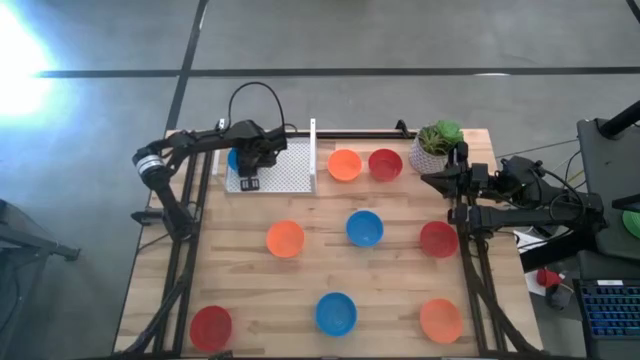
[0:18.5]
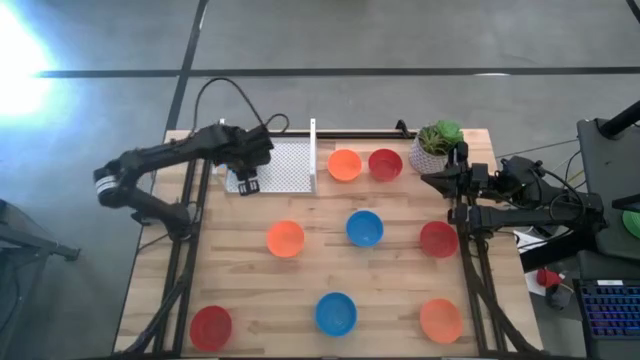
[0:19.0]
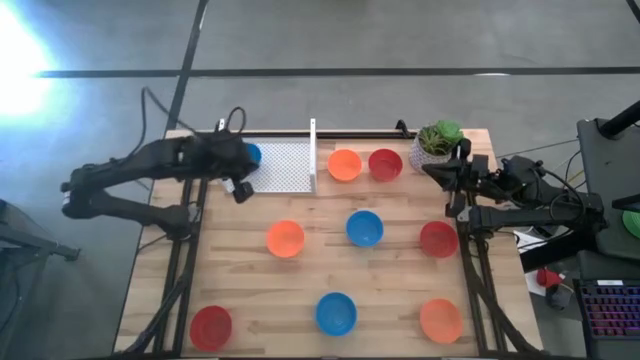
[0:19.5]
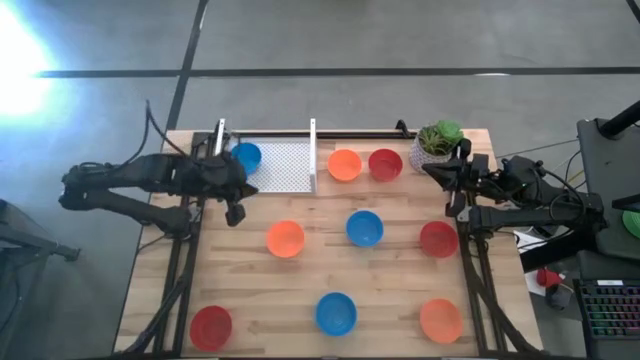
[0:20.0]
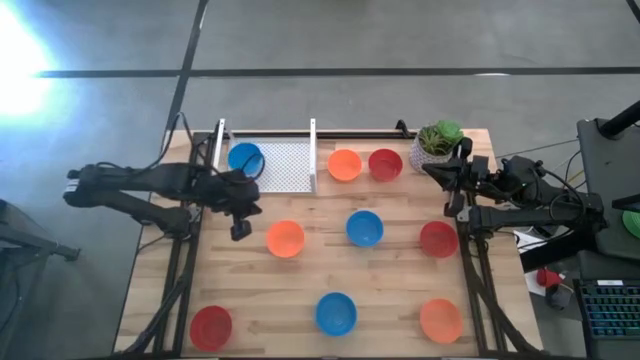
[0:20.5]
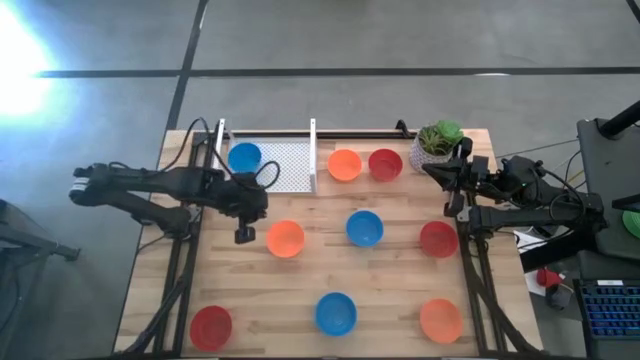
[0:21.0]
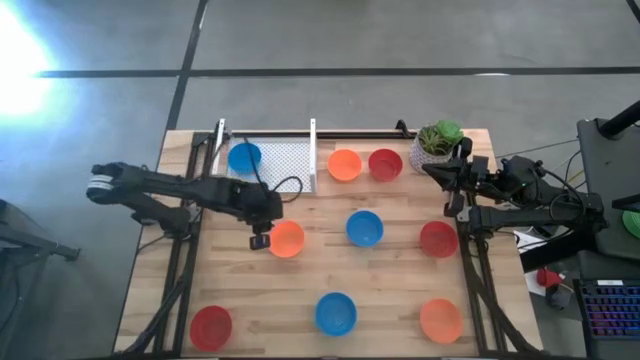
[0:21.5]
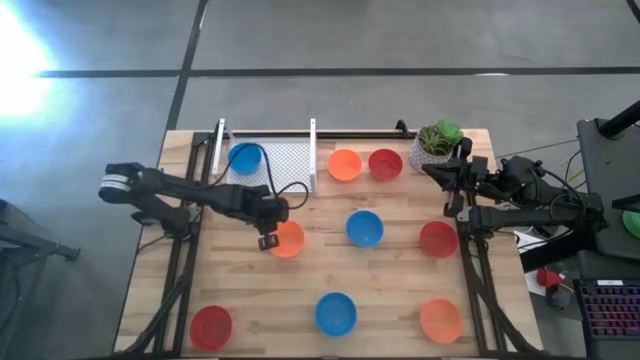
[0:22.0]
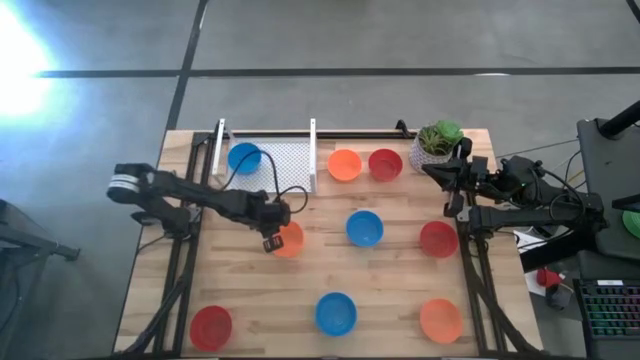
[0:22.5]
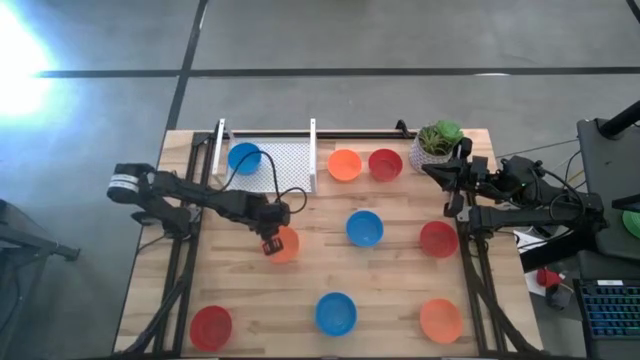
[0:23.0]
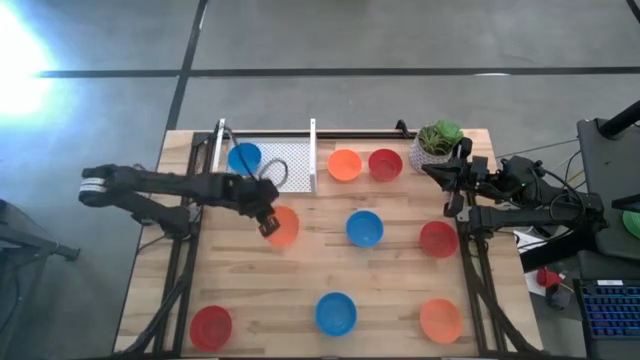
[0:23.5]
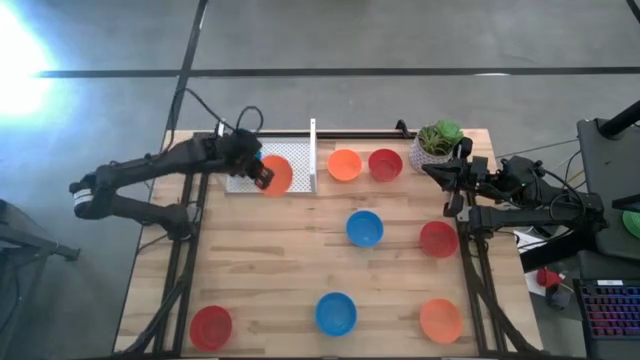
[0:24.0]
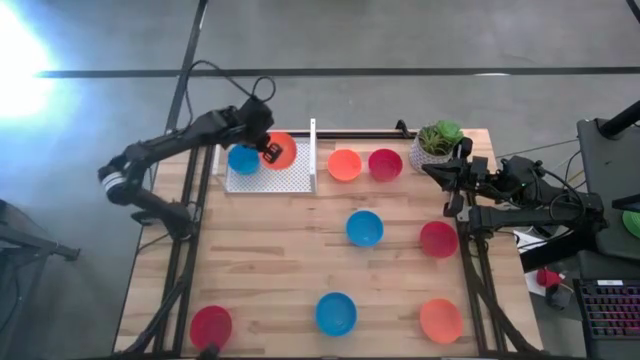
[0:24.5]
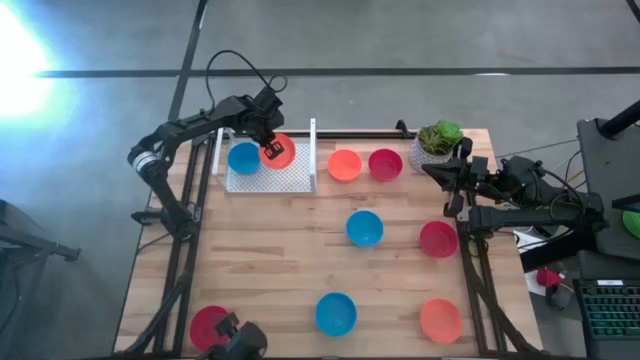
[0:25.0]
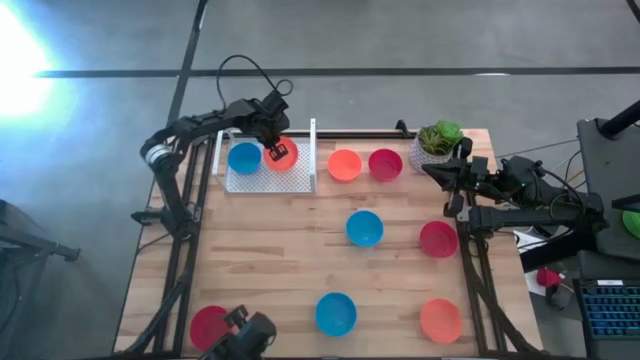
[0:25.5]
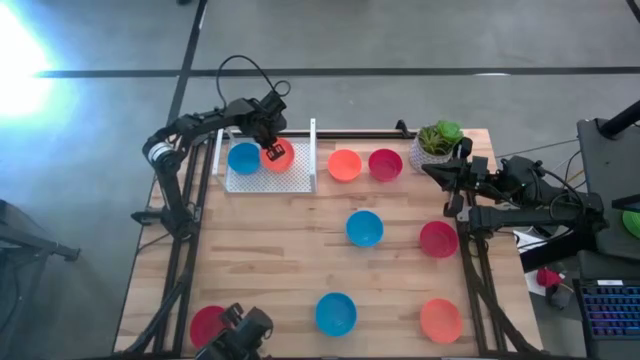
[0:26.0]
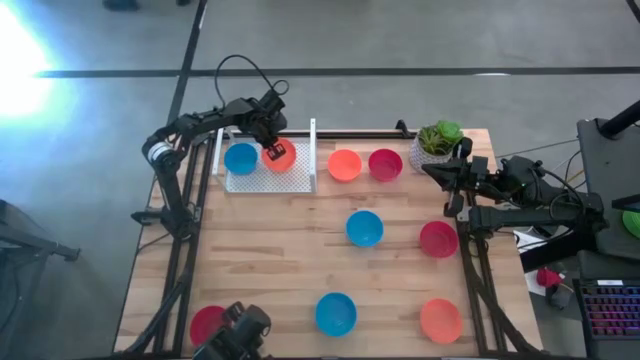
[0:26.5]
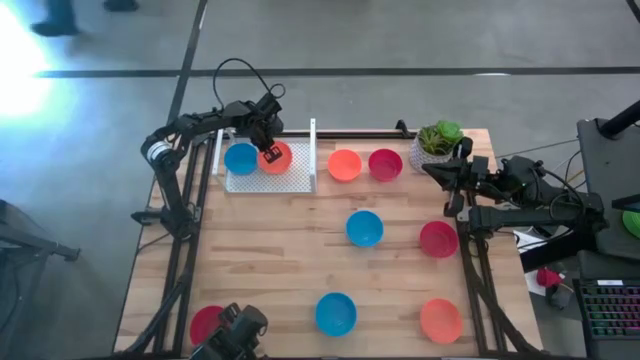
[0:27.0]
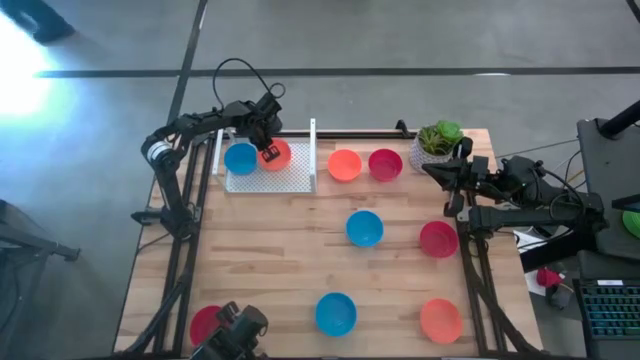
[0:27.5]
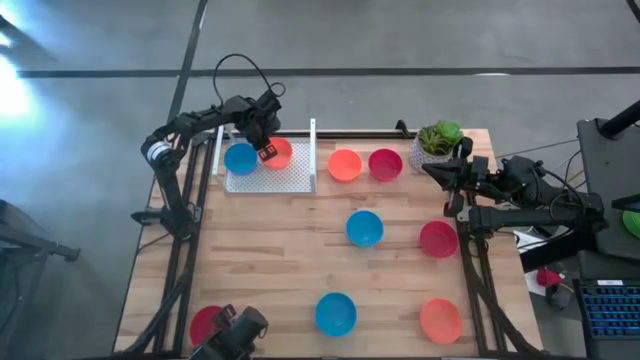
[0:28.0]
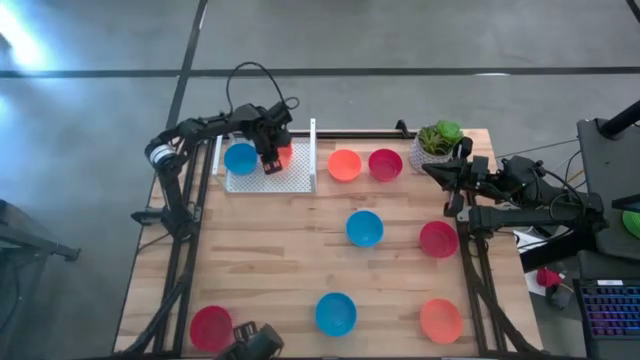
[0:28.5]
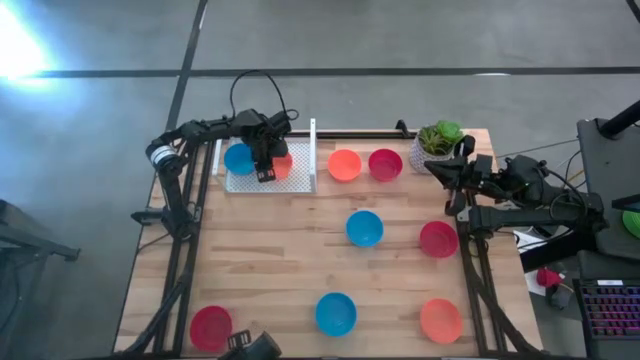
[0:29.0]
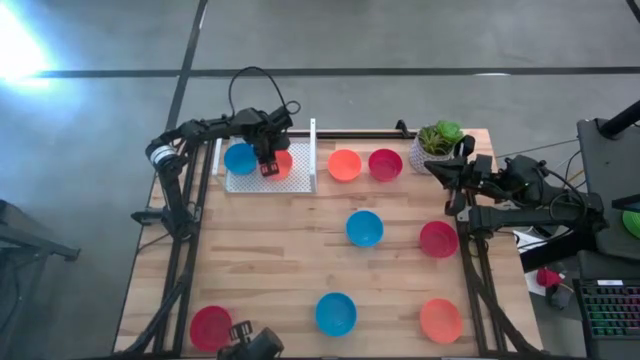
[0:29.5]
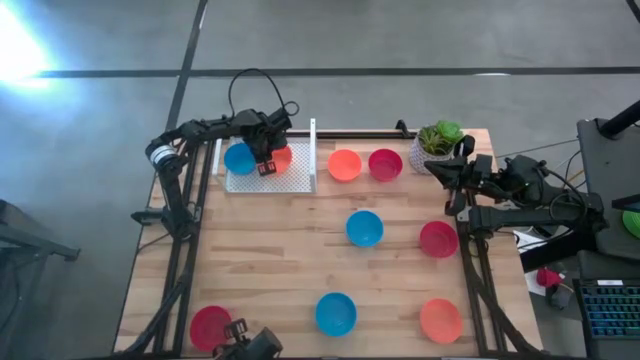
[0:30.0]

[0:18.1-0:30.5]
Task: Pick & Place Mini bowls
Put the left orange bowl on the shelf

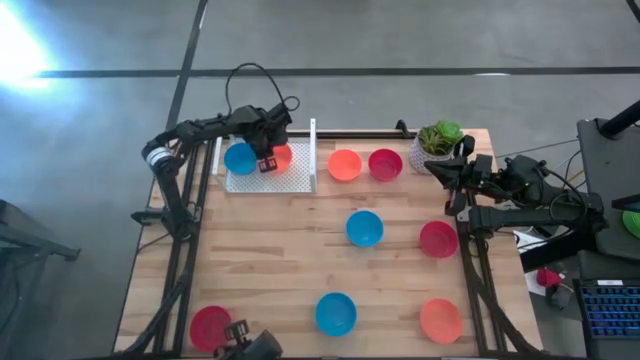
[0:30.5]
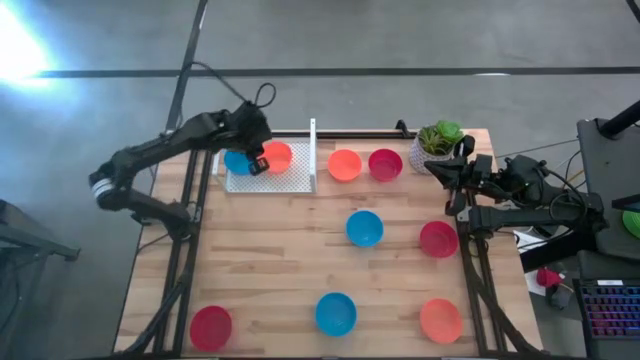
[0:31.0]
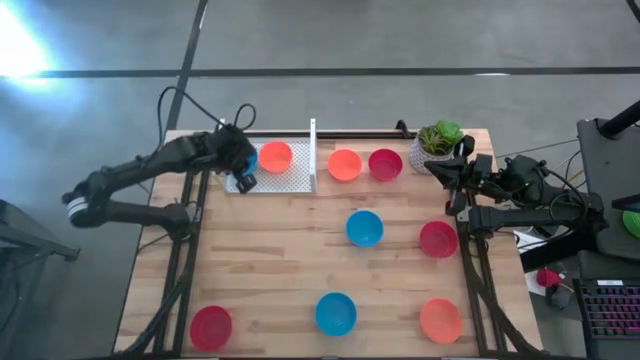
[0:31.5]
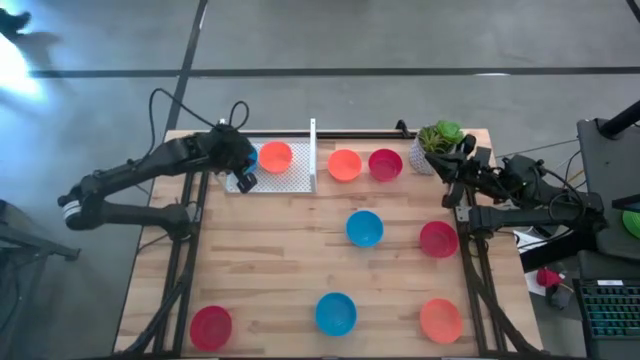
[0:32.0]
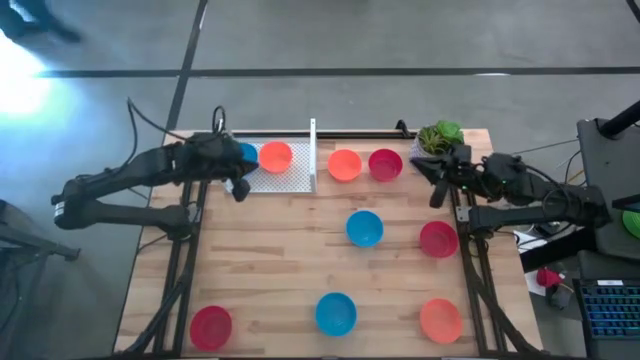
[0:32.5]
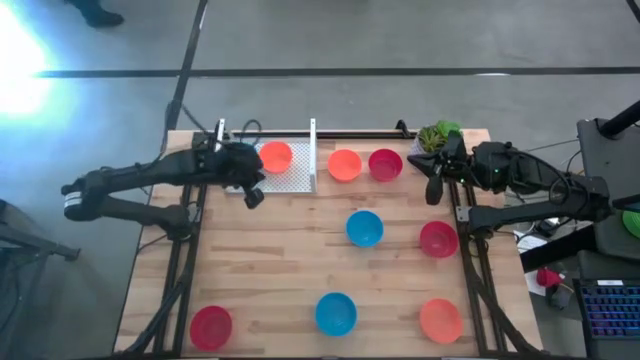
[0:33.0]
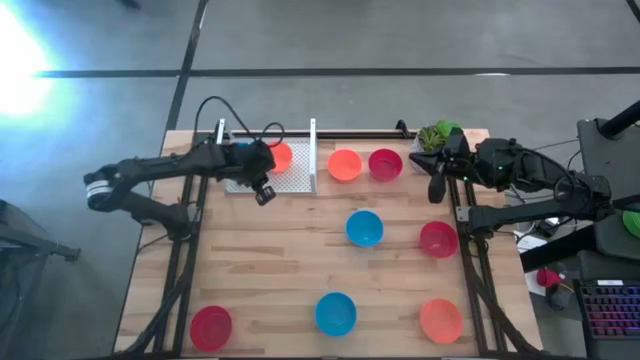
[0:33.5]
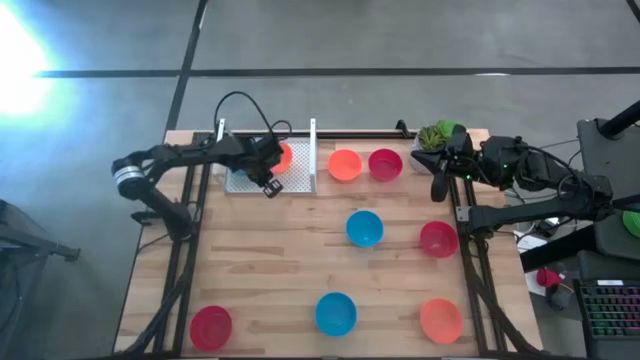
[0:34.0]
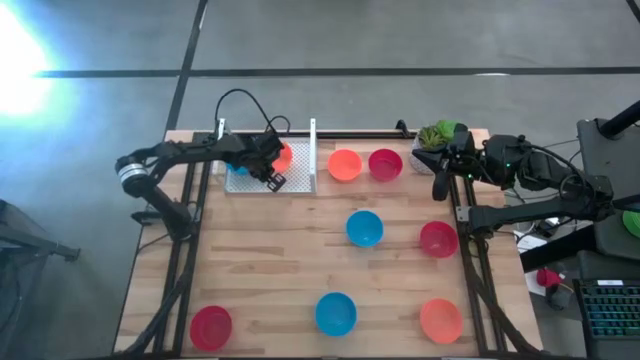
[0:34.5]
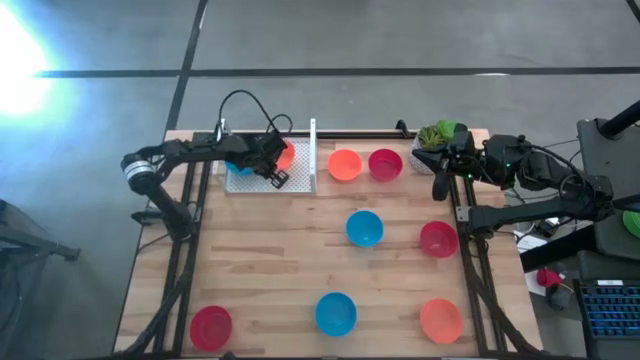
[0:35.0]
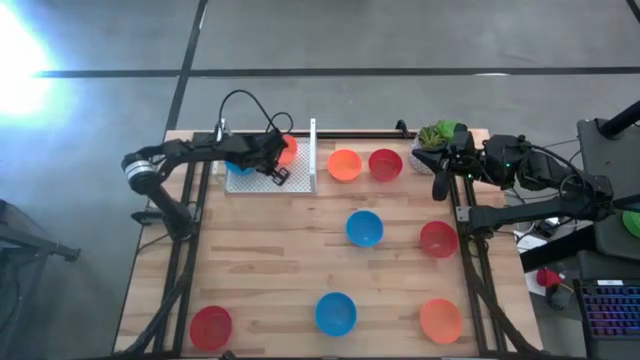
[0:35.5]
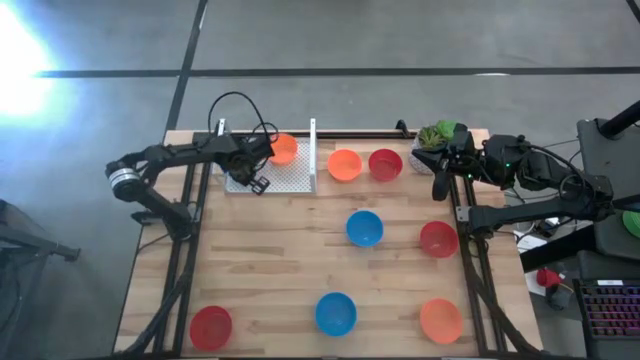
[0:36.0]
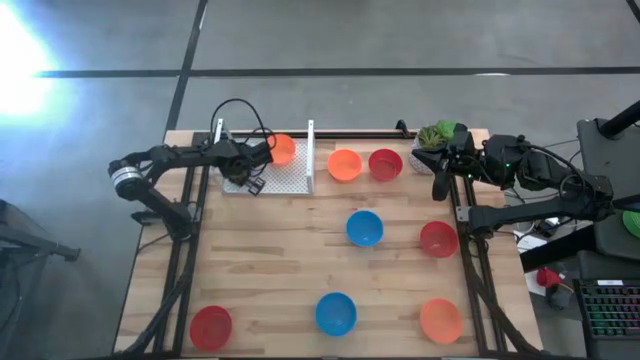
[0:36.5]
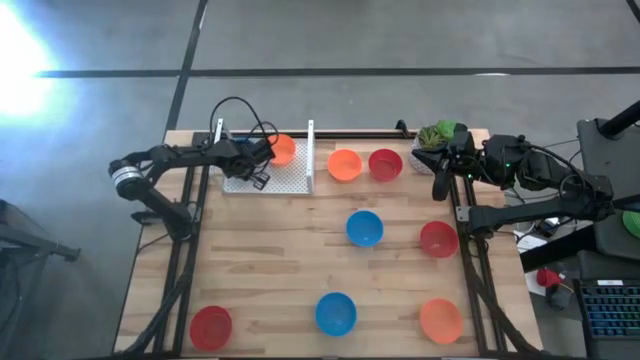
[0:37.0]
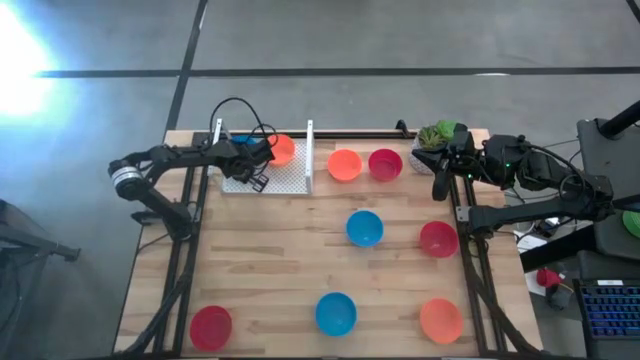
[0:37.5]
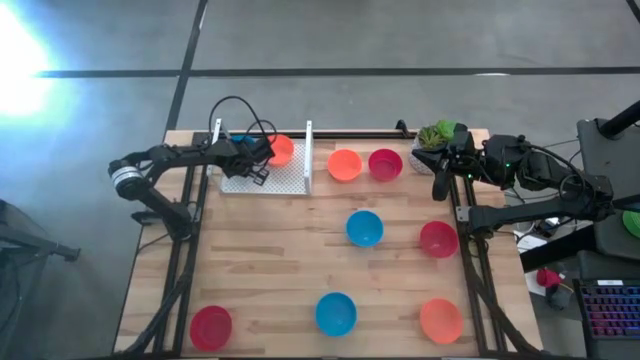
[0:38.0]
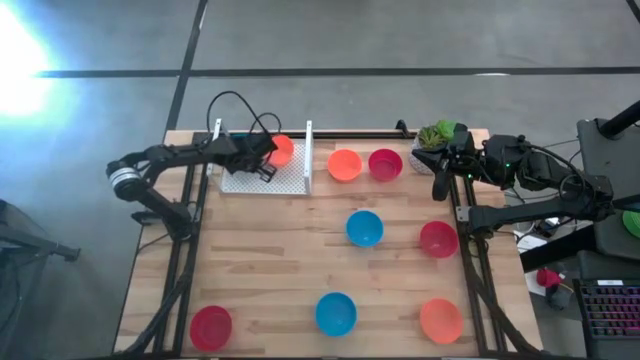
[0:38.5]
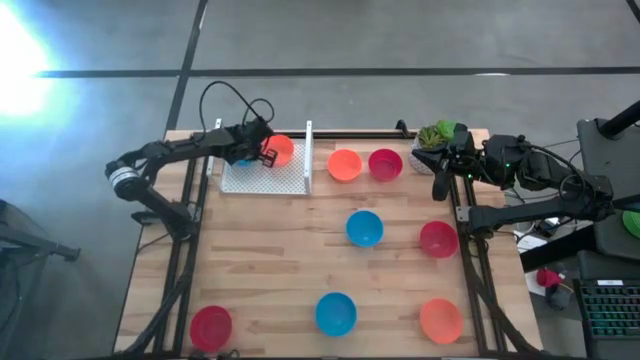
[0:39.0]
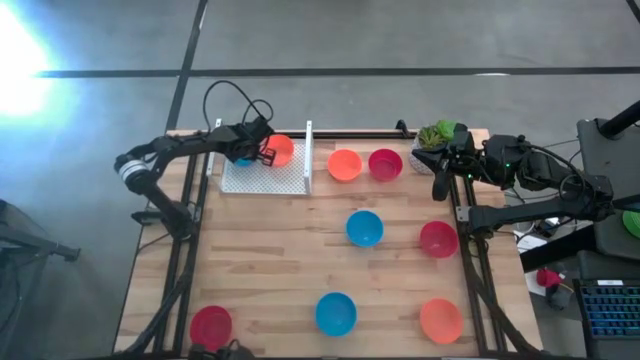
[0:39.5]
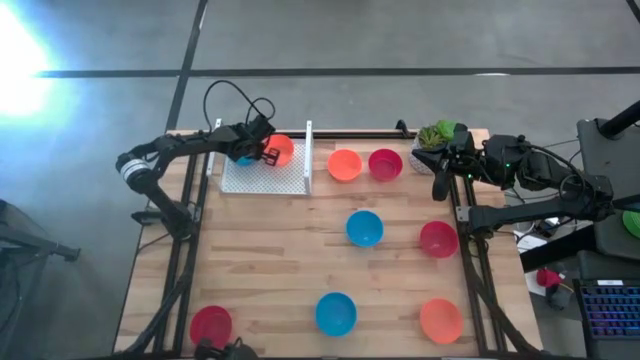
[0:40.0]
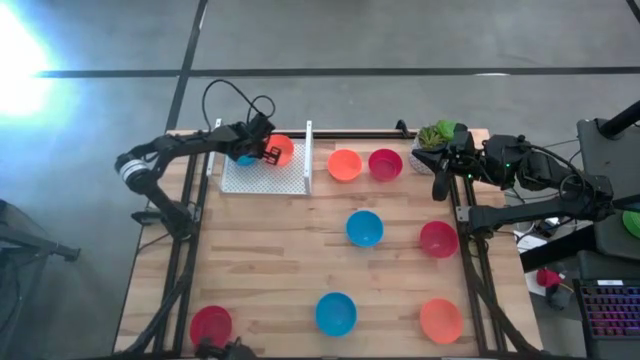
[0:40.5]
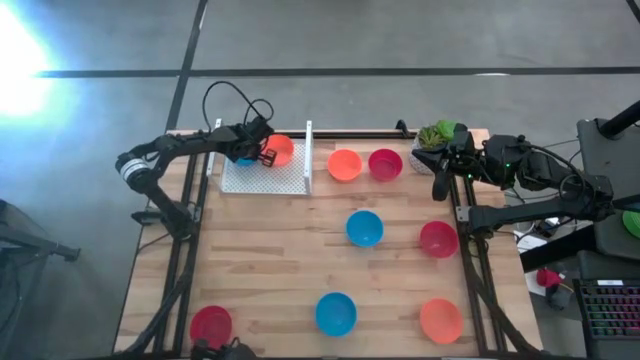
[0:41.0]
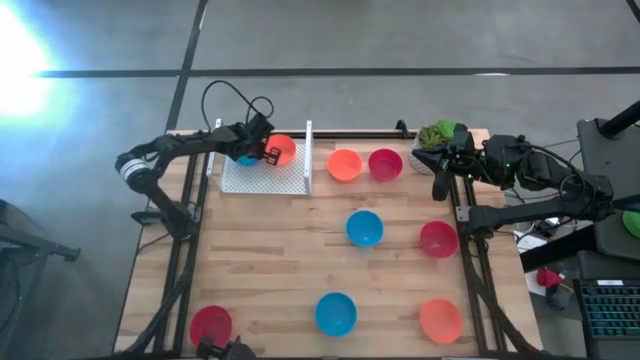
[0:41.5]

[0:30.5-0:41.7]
Adjust the bowls on the shelf
